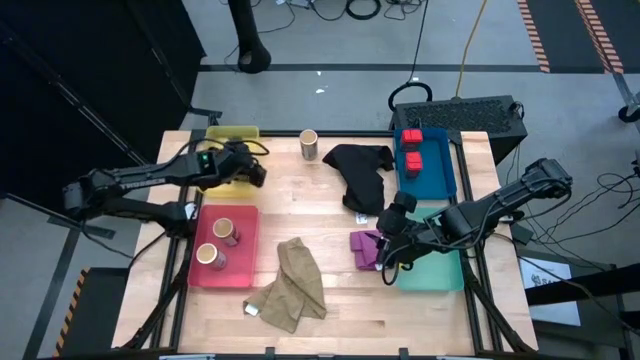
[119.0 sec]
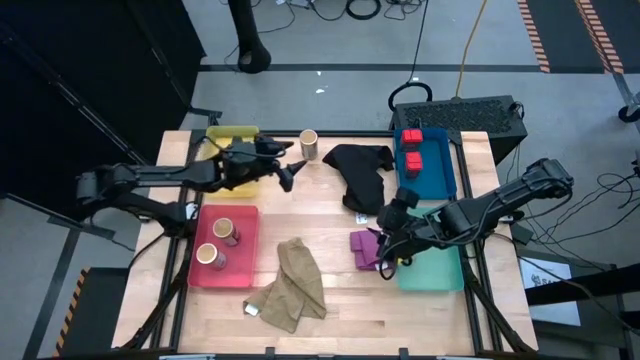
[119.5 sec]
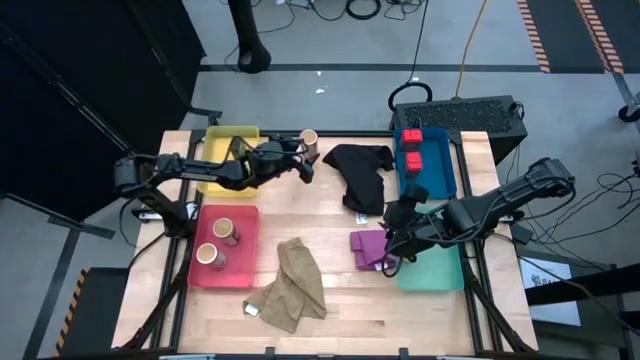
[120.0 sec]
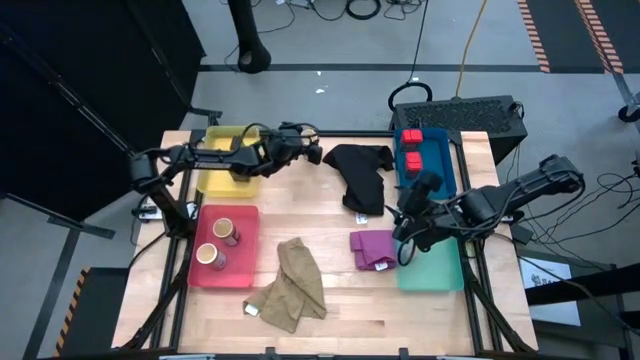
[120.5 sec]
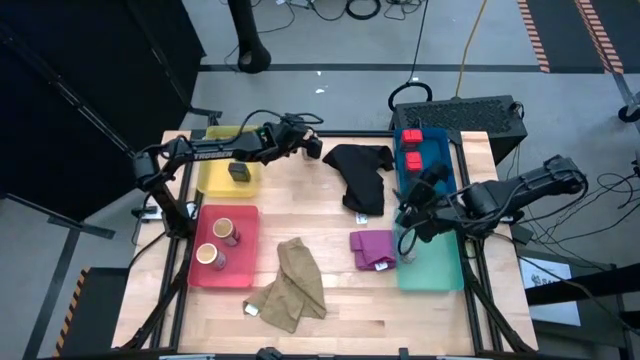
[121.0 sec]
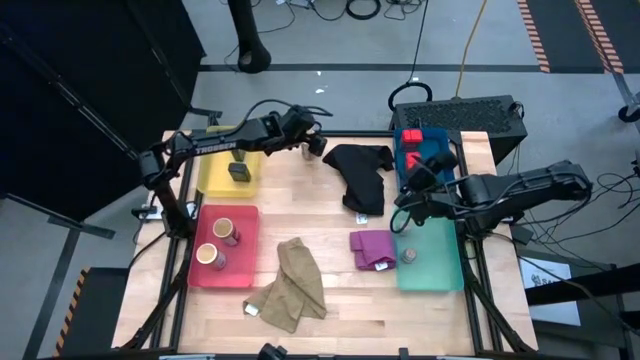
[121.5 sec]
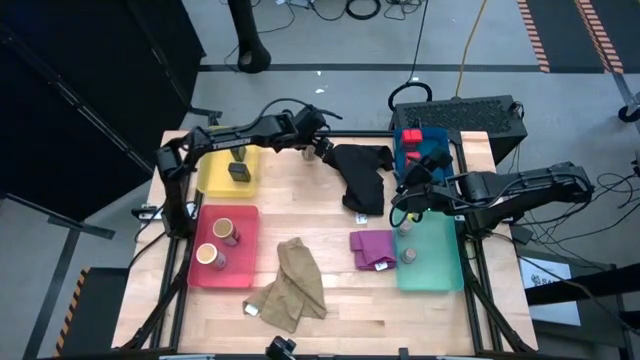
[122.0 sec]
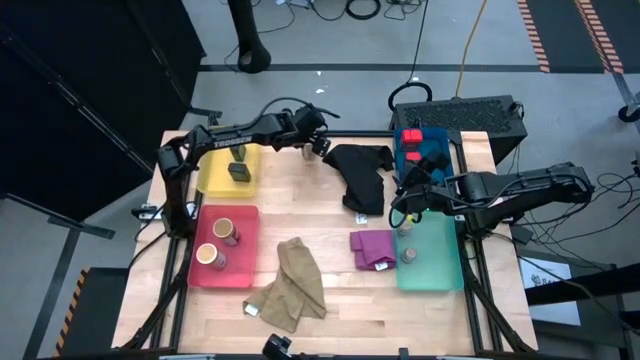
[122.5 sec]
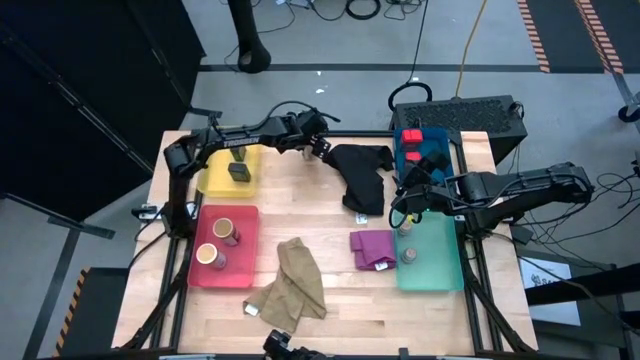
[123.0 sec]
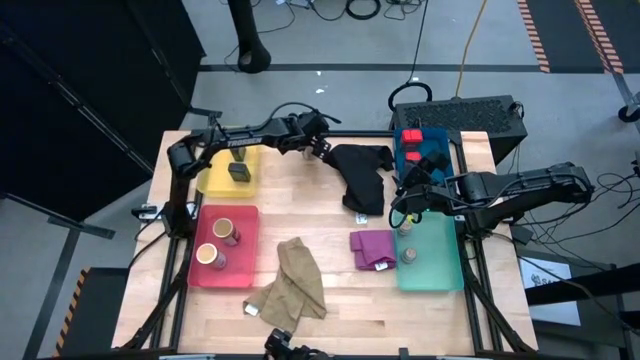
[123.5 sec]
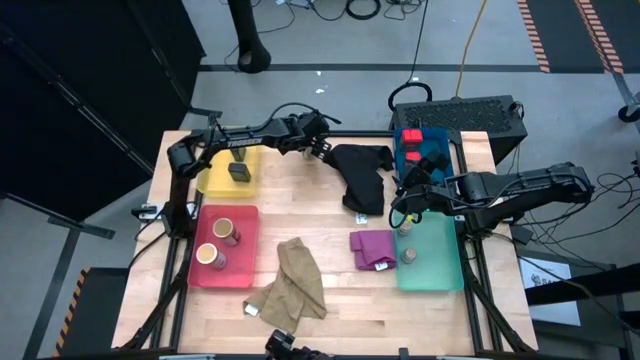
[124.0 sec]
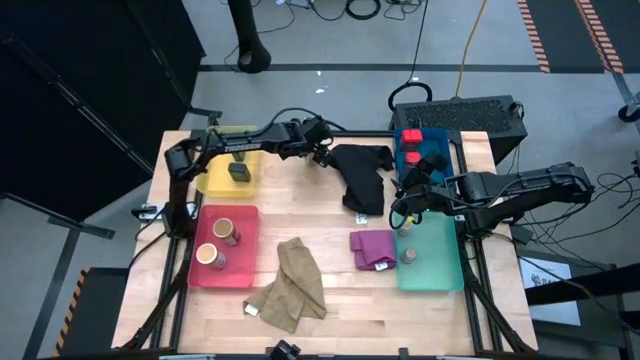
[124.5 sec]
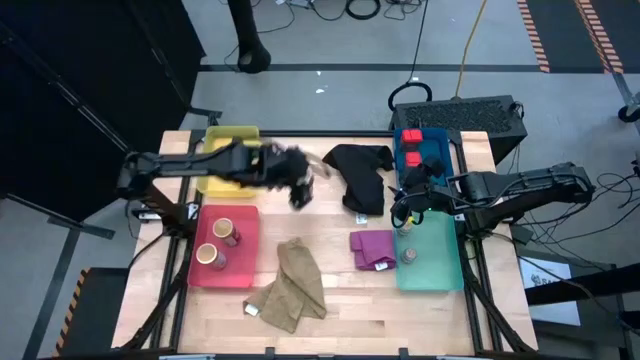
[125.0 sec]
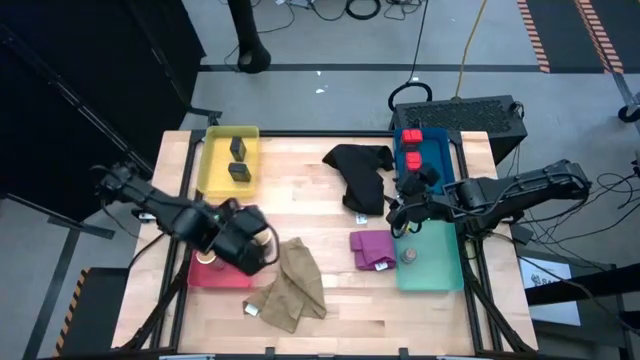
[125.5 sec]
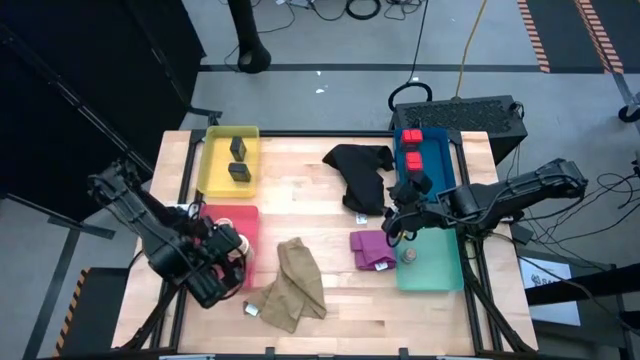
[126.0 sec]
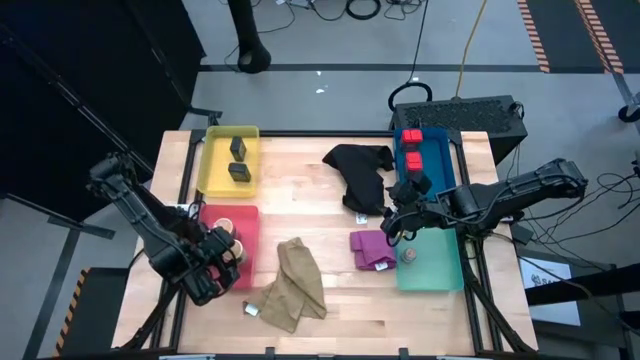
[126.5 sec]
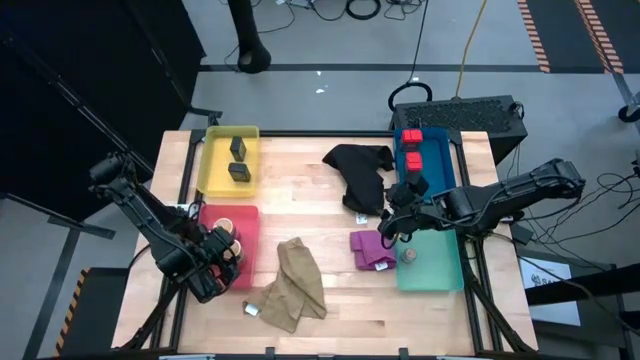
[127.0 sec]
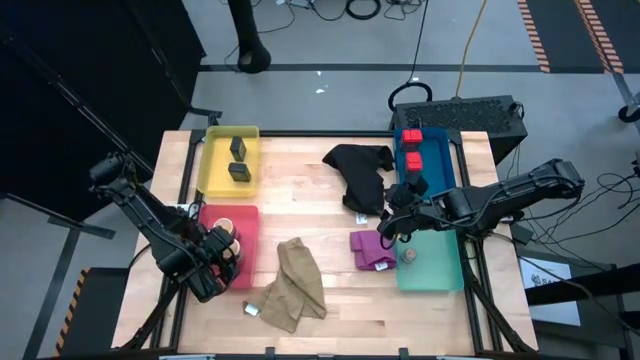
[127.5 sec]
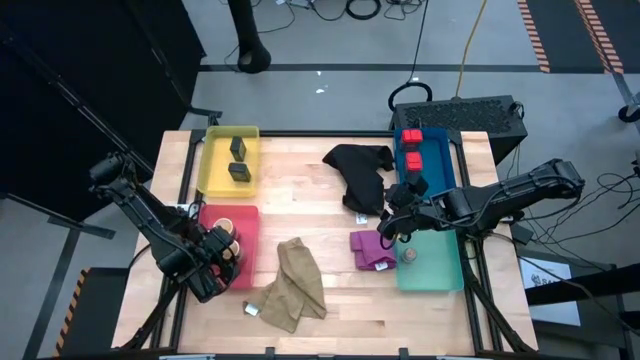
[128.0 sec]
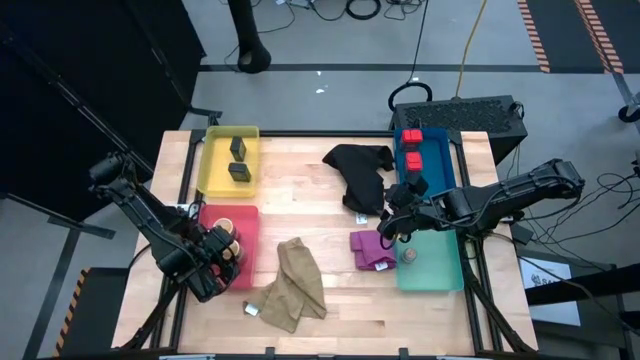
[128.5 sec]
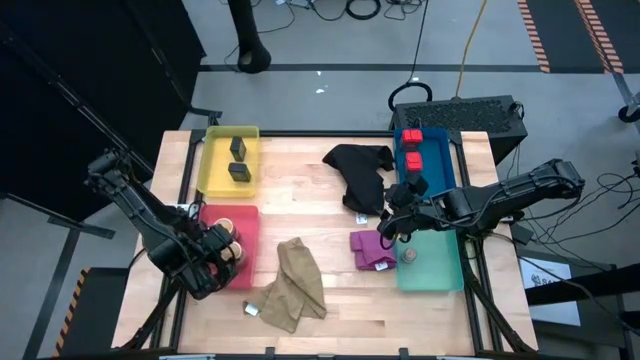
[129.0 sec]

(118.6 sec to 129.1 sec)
Task: Sort spices by type
Put the gold seasoning bottle into the red bin

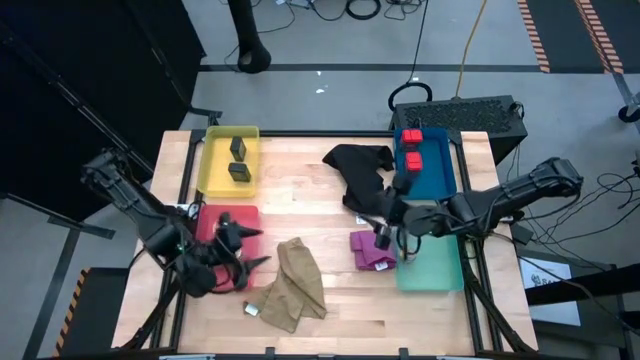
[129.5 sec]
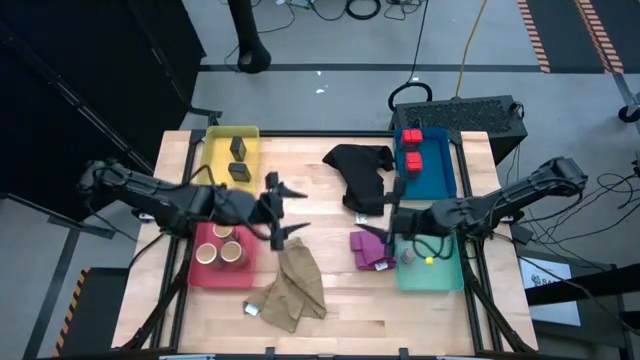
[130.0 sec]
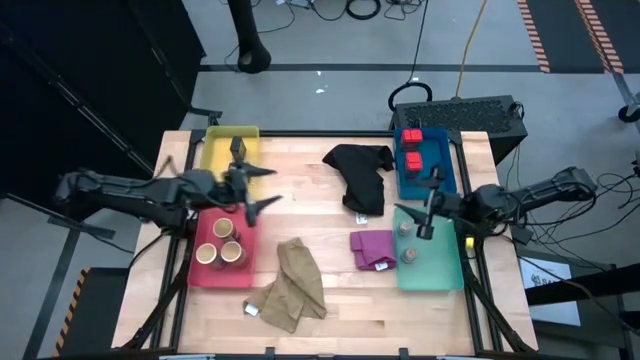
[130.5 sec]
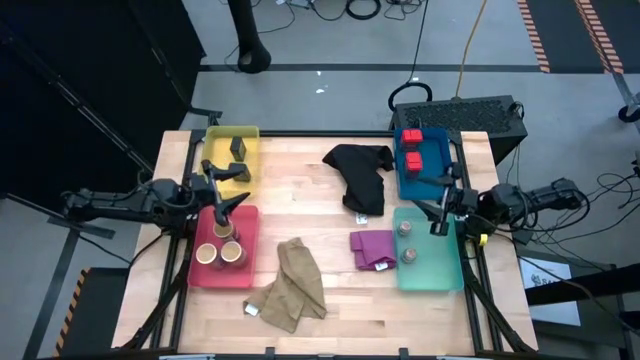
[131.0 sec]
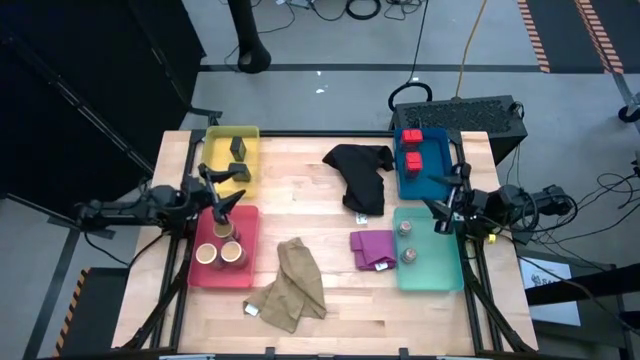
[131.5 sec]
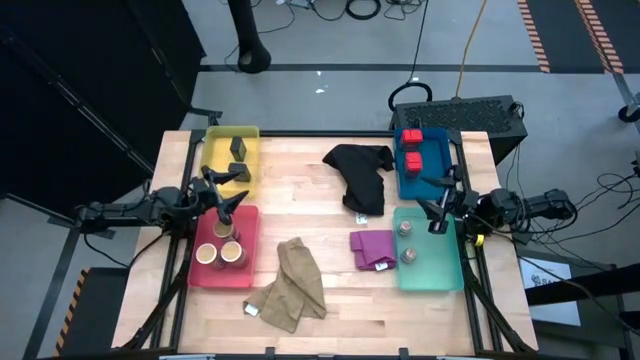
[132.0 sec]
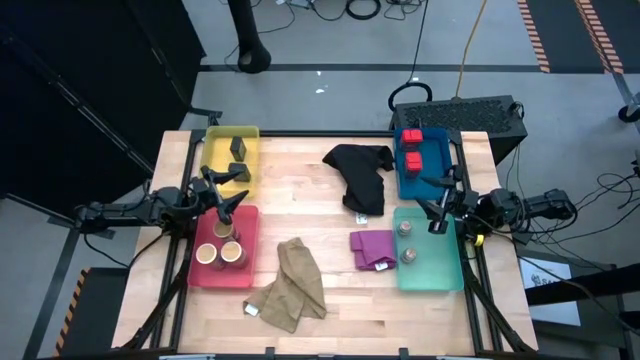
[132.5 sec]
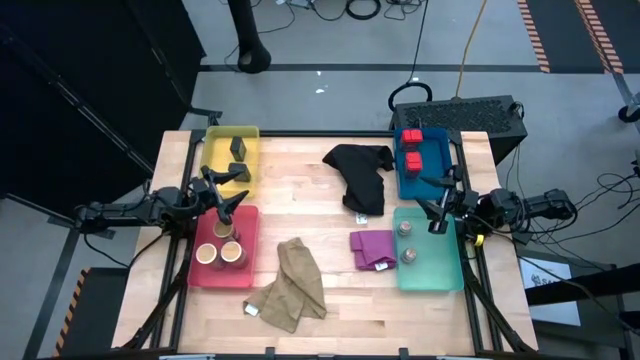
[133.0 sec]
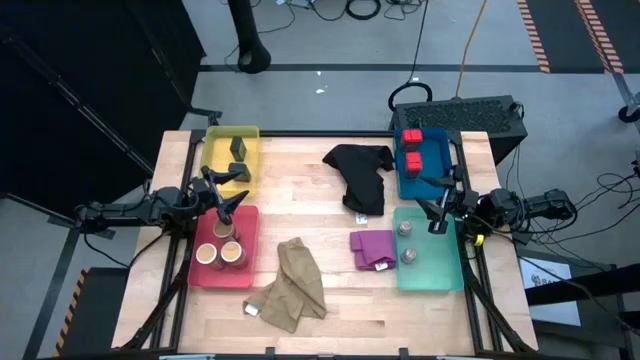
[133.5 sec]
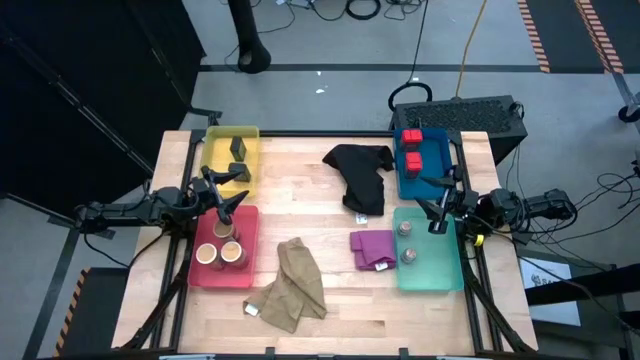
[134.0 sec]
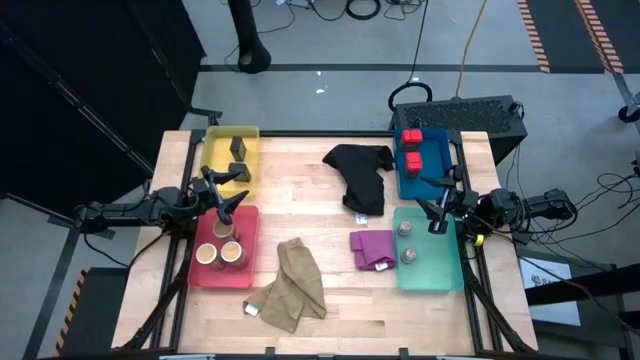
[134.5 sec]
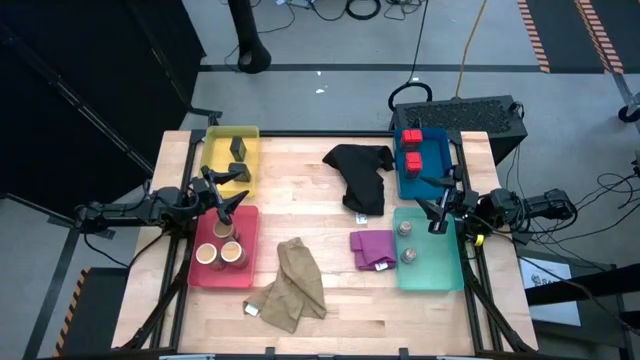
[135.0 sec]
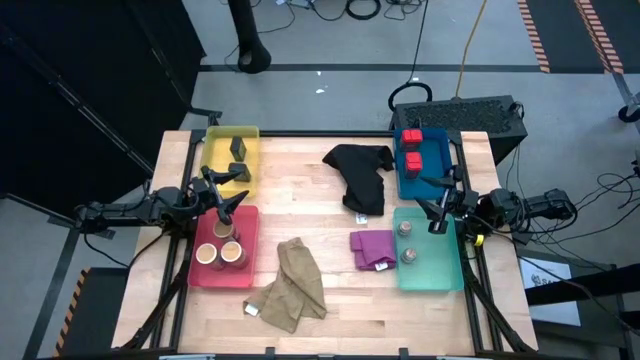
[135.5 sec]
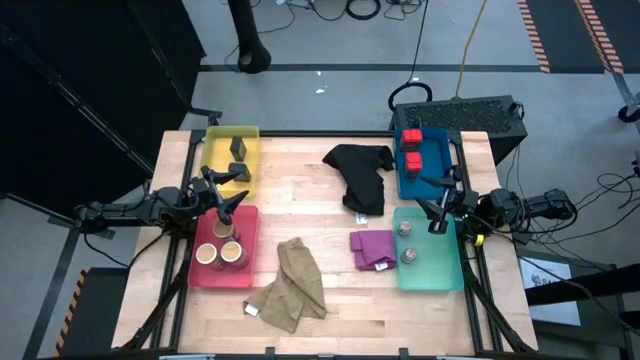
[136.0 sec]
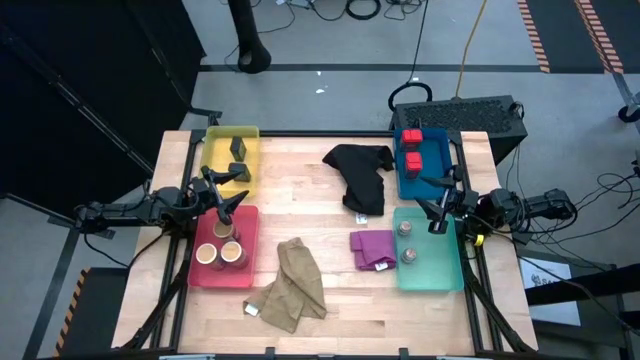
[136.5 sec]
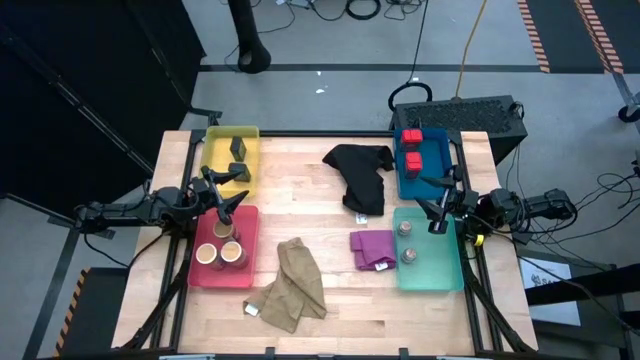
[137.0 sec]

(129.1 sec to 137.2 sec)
Return to Home Position
